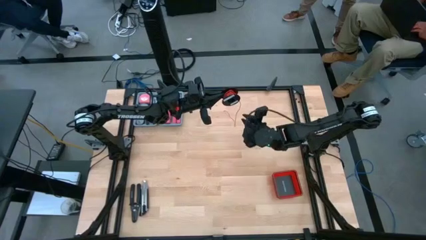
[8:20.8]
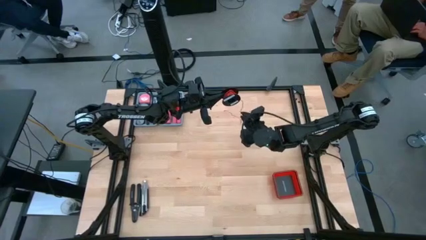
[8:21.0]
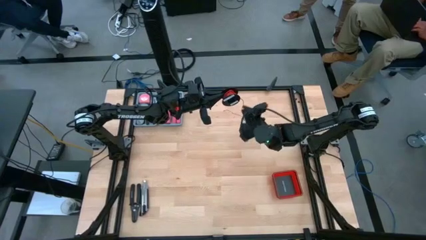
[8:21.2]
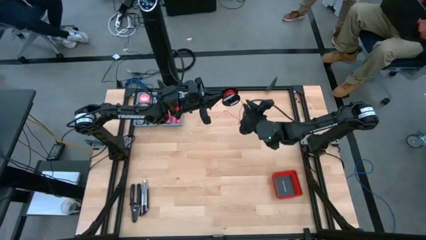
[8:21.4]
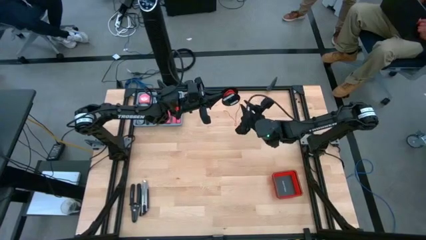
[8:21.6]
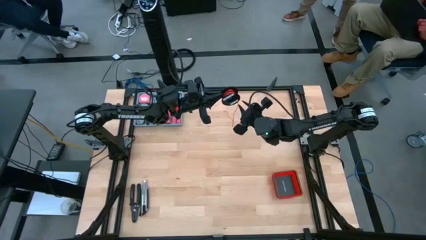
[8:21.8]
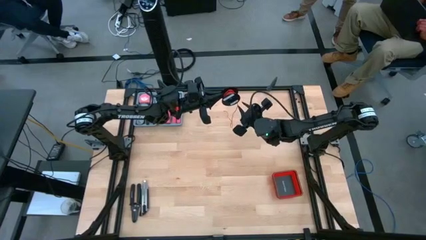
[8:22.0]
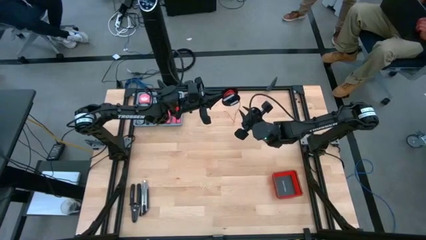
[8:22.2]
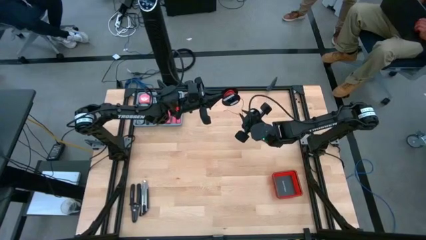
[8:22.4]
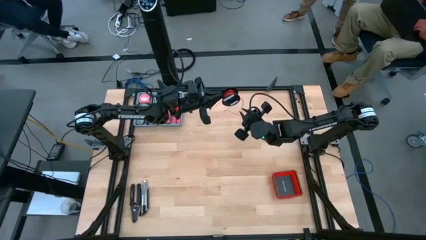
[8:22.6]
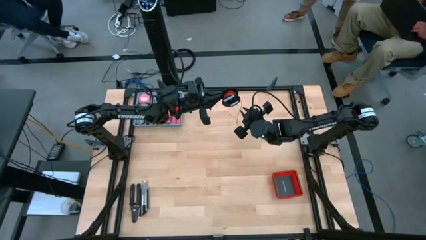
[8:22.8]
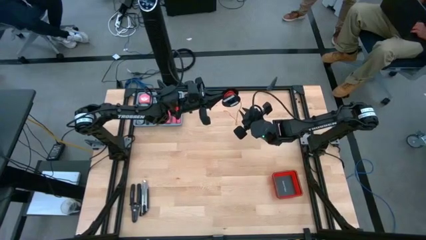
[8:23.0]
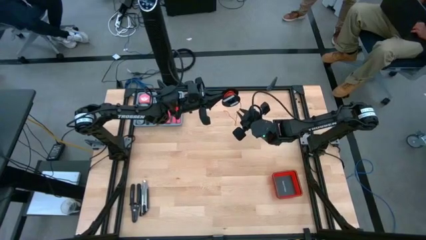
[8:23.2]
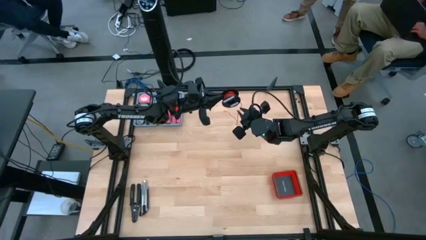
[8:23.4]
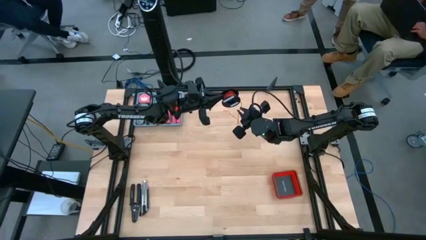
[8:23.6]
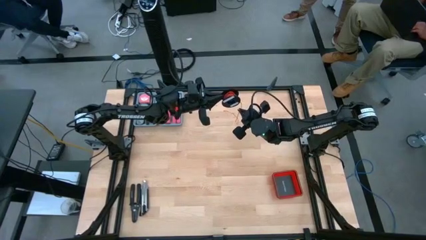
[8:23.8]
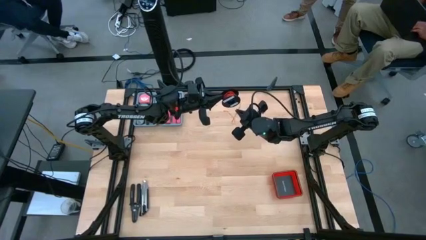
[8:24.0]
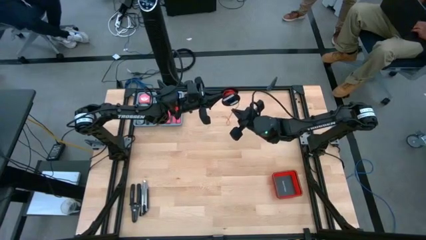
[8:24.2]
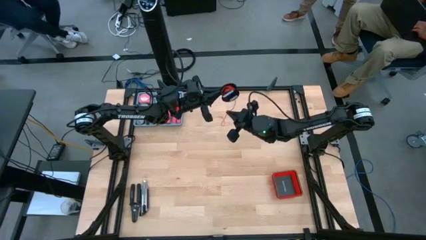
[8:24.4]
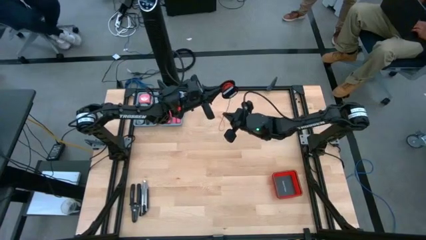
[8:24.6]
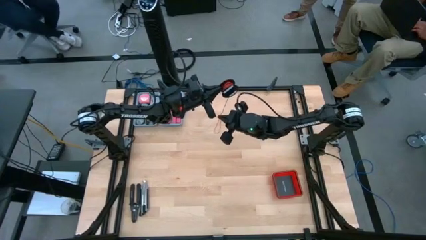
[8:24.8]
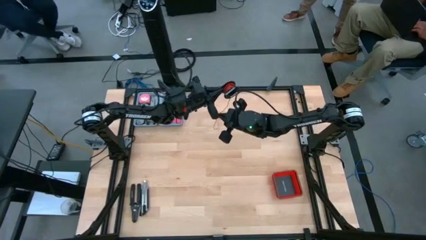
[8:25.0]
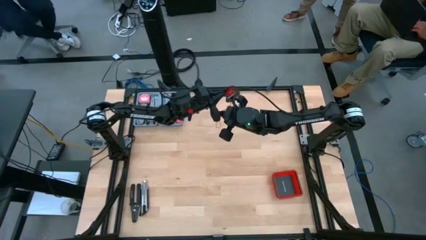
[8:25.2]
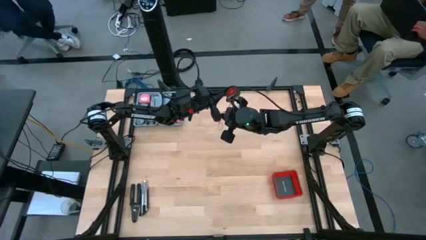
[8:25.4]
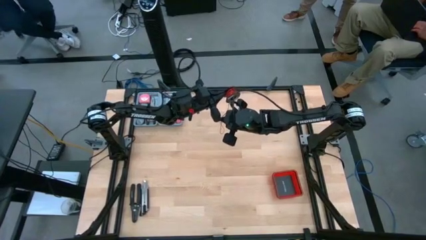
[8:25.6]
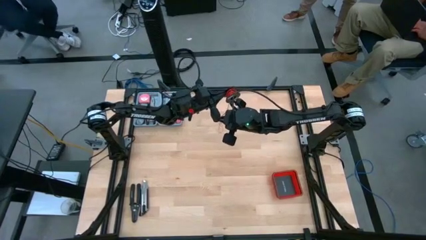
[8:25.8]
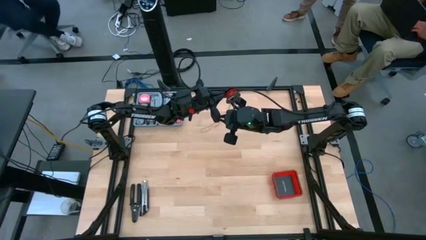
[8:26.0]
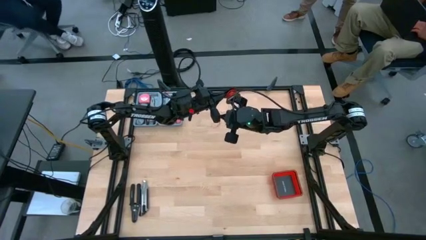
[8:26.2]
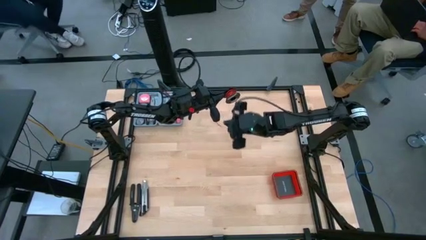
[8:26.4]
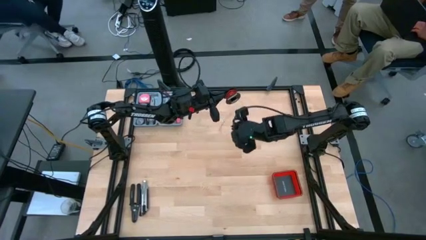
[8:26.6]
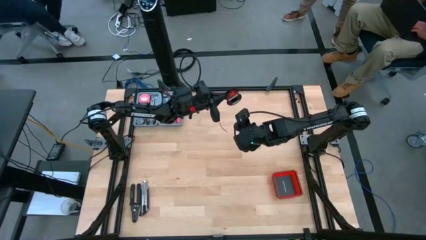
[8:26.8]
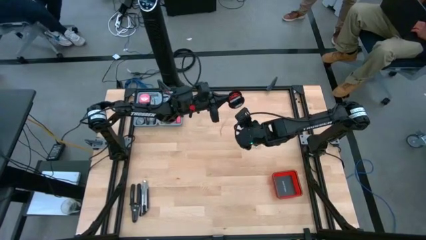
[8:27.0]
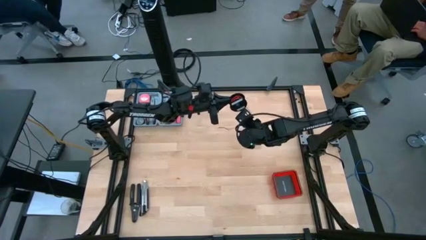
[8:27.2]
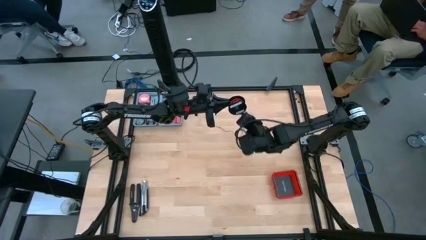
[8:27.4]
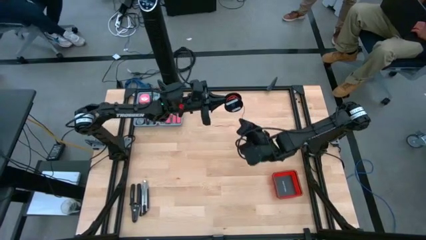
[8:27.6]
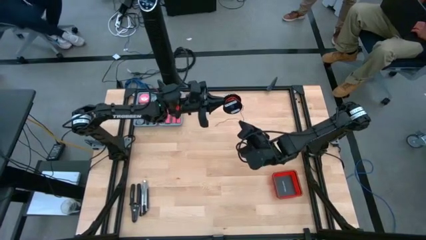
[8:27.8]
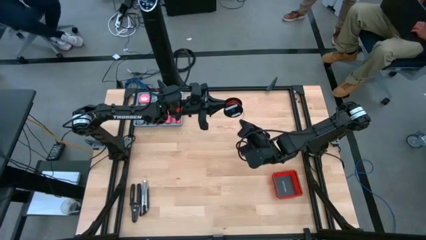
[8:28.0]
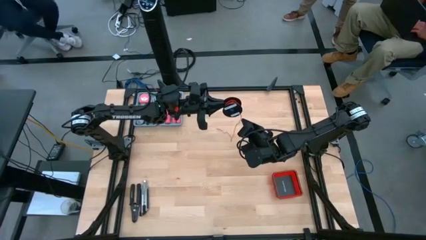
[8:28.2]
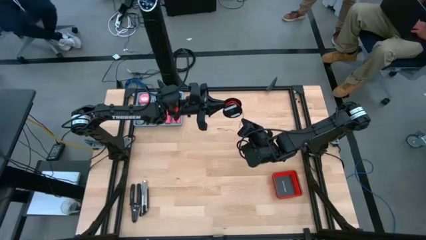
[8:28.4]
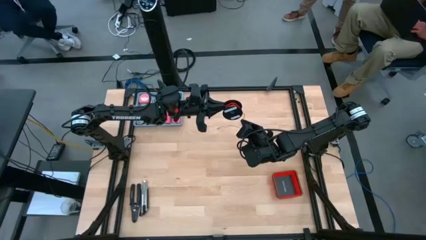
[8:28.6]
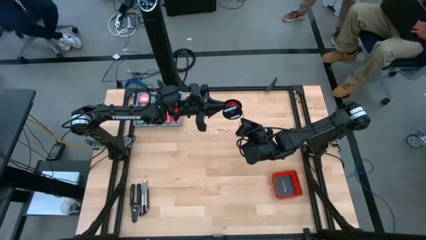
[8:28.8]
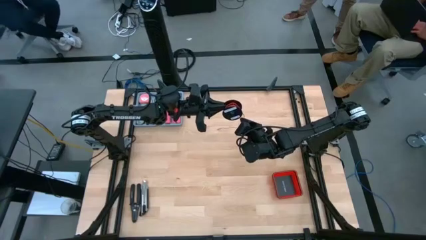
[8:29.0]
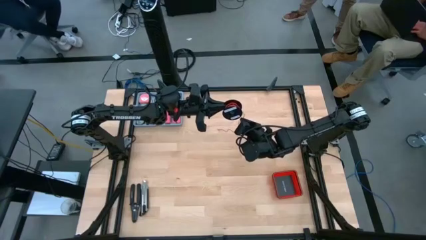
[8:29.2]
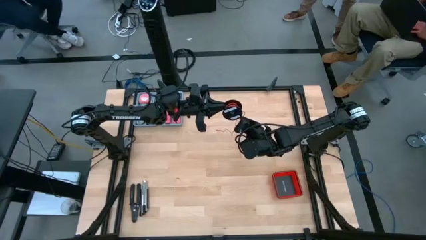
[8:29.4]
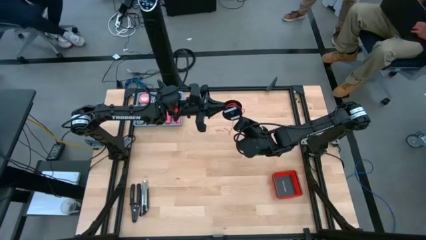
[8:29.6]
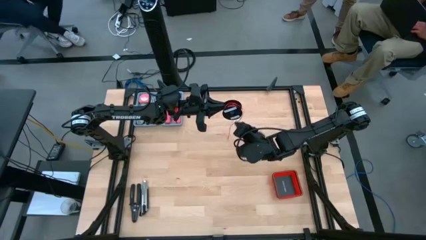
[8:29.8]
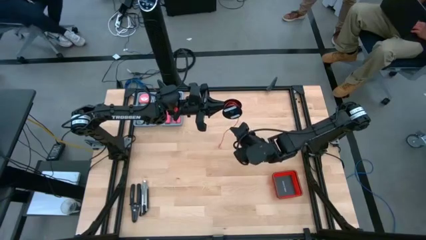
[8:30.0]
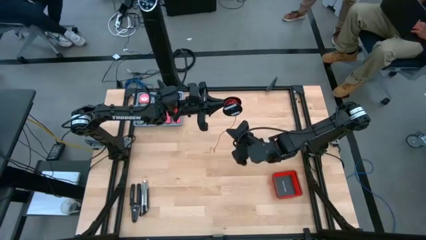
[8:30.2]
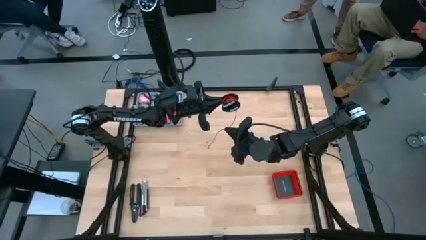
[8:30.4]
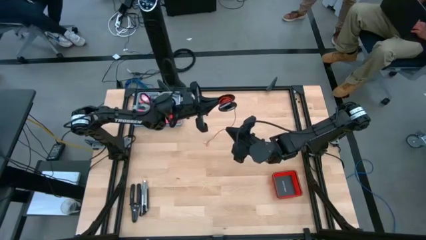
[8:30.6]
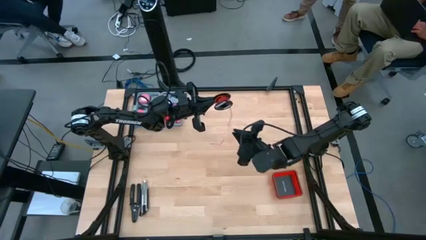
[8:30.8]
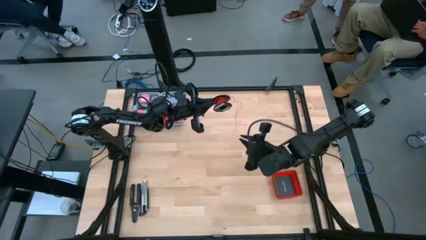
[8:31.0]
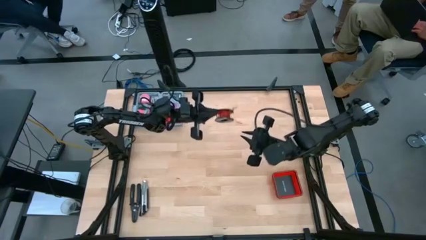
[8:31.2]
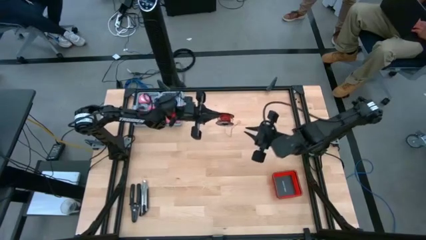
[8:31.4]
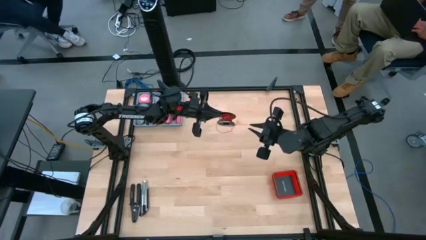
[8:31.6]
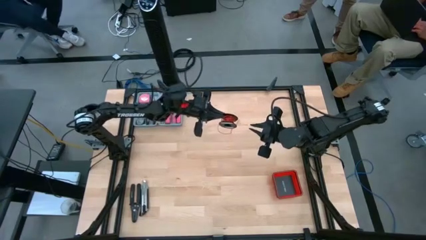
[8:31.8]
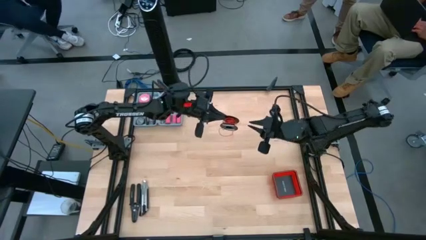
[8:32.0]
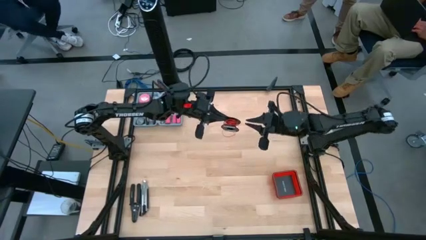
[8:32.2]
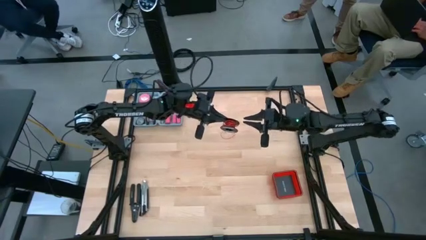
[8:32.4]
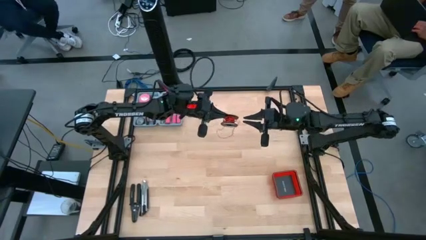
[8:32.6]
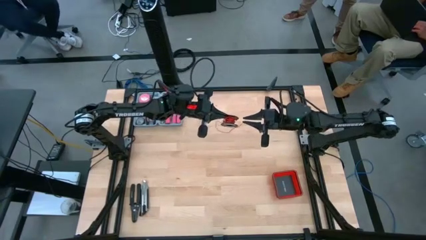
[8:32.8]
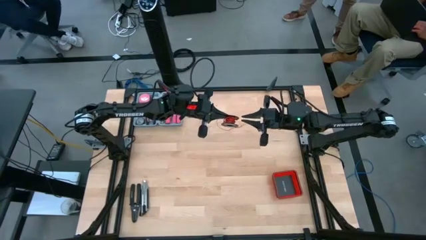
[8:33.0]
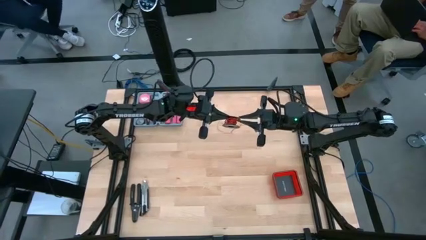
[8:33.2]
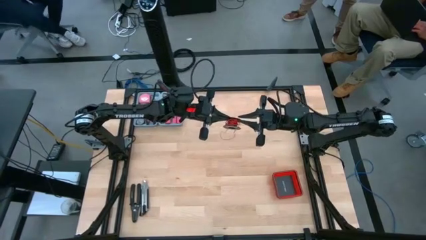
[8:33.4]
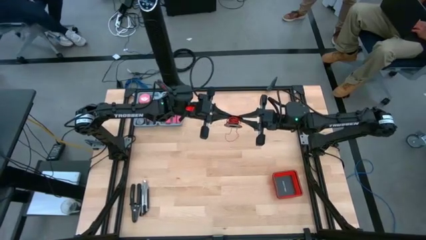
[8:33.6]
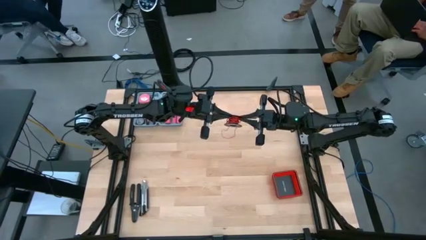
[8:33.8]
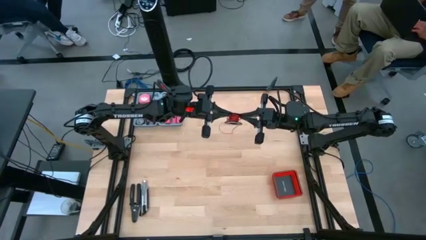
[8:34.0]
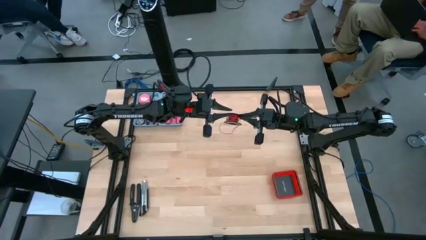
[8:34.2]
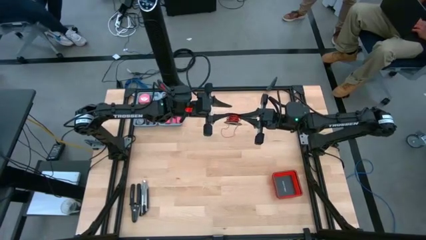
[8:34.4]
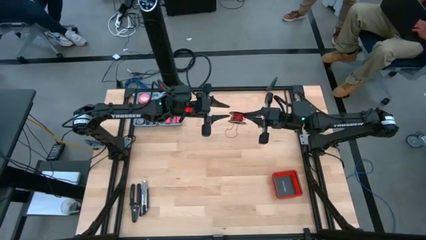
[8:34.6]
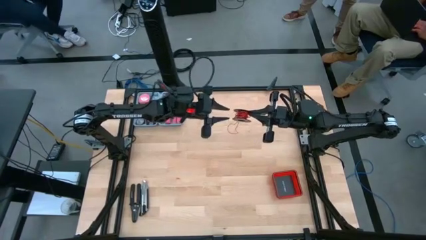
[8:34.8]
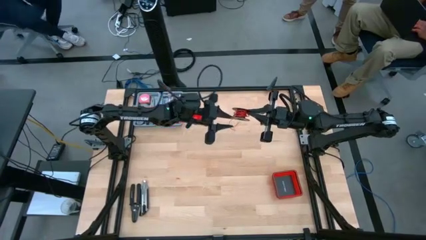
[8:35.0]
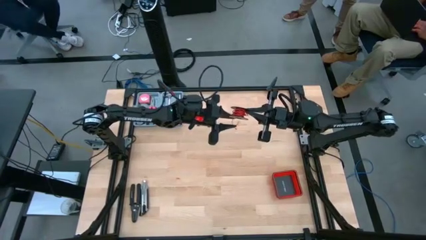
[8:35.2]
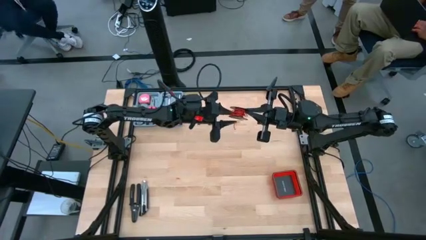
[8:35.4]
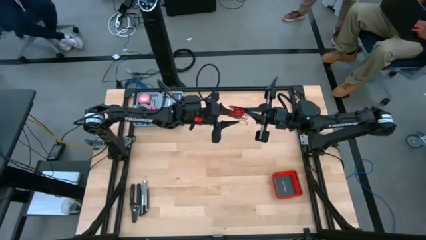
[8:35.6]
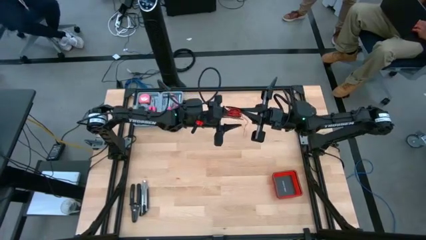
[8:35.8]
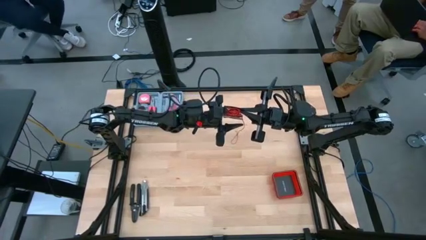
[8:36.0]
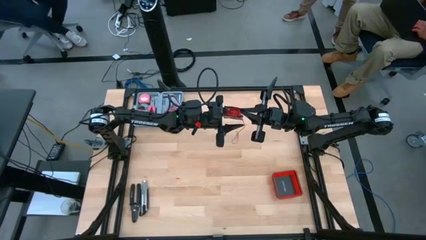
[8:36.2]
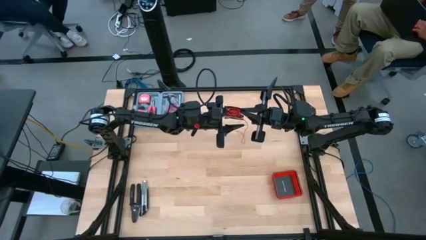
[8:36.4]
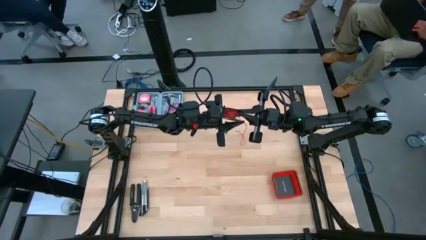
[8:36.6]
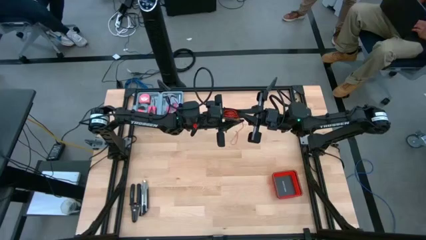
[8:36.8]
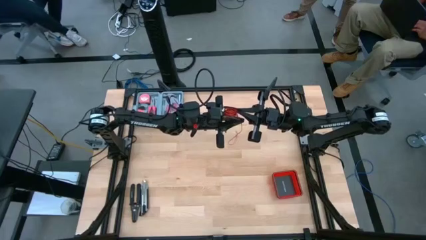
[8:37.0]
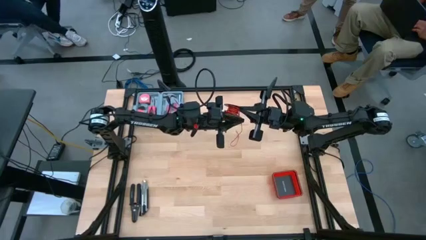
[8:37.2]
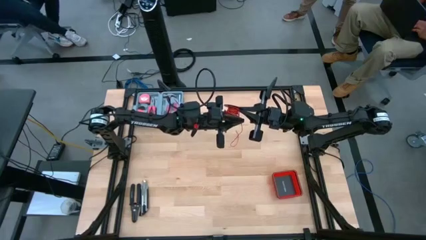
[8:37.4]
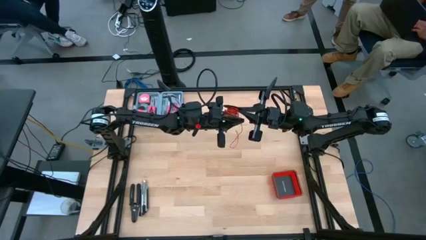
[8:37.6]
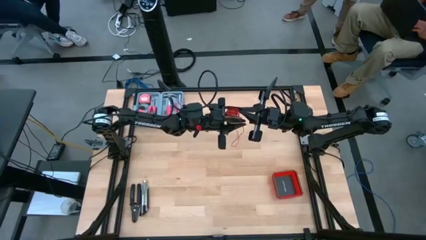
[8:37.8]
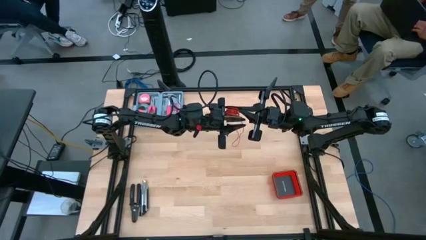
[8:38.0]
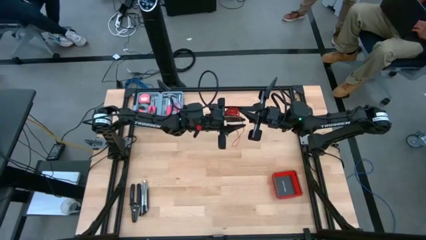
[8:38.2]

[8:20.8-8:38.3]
Task: Coil cords
Coil the red wire onto the spool
